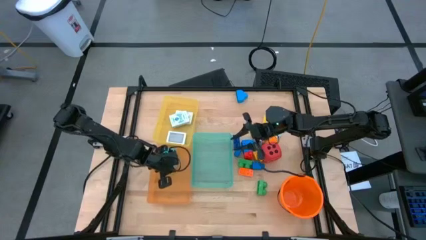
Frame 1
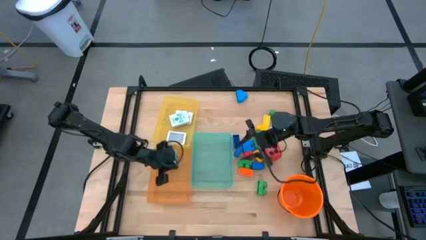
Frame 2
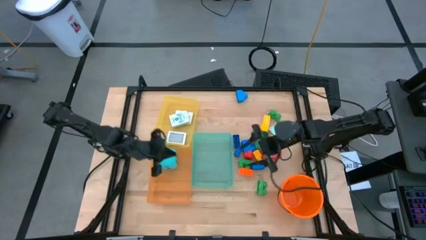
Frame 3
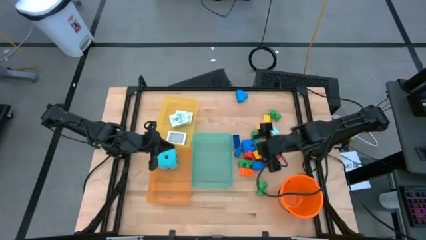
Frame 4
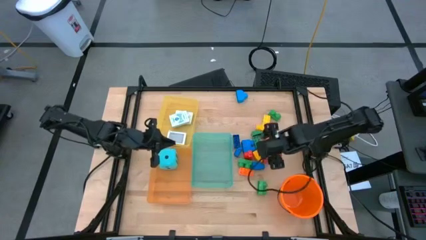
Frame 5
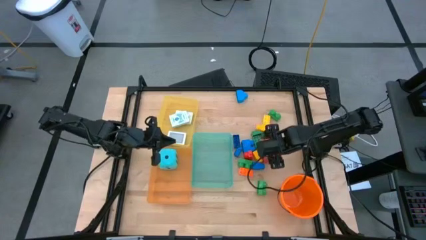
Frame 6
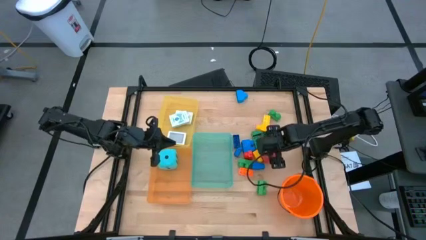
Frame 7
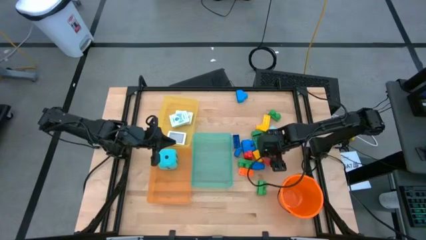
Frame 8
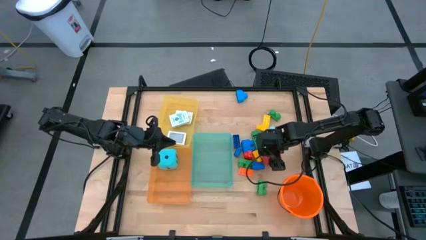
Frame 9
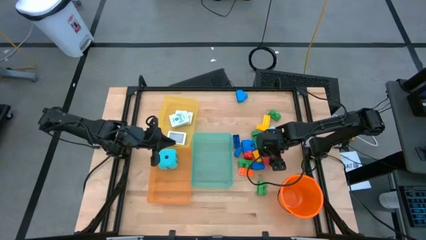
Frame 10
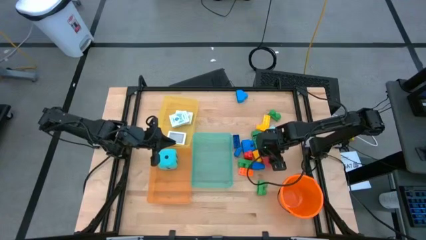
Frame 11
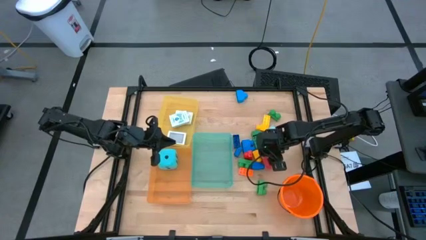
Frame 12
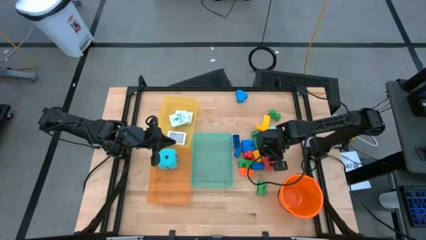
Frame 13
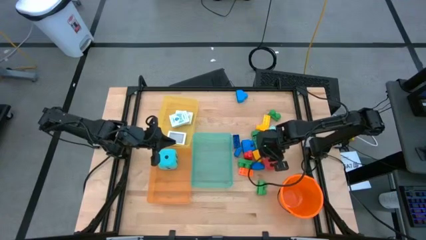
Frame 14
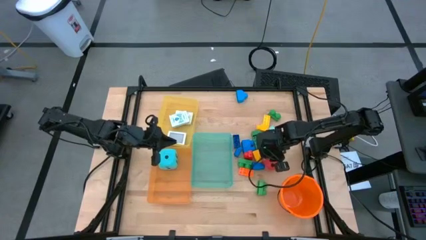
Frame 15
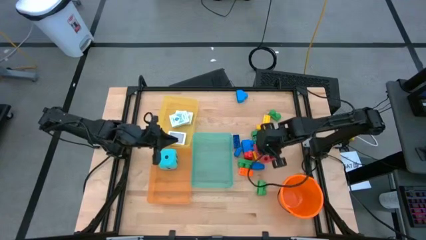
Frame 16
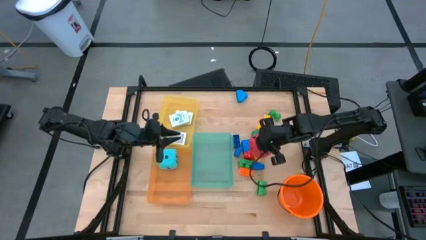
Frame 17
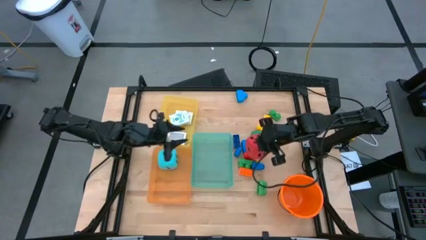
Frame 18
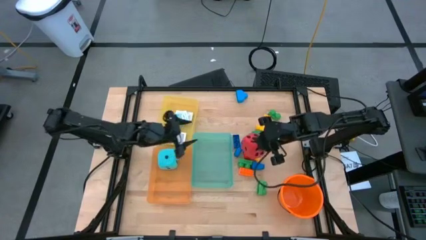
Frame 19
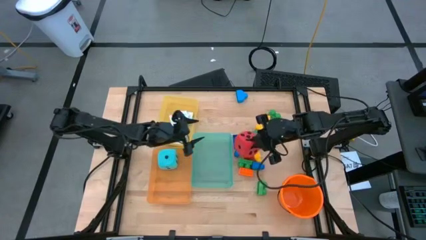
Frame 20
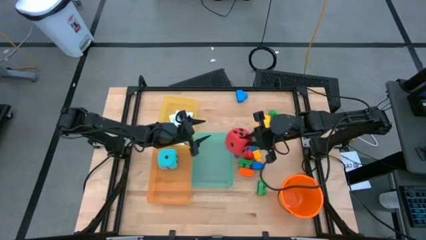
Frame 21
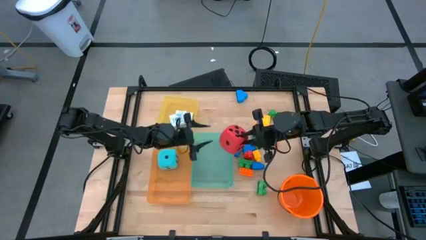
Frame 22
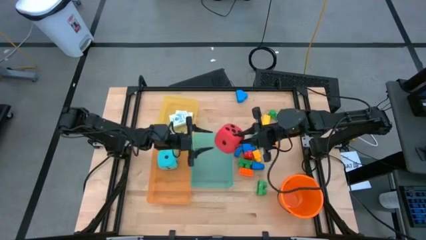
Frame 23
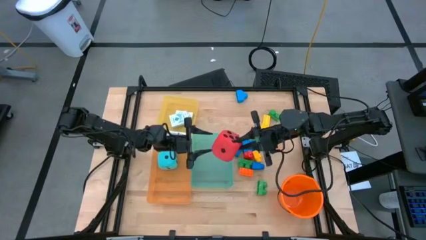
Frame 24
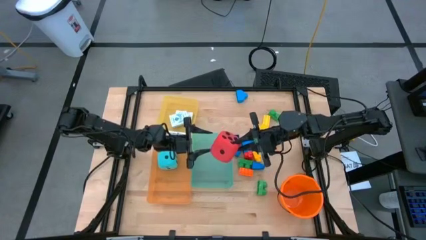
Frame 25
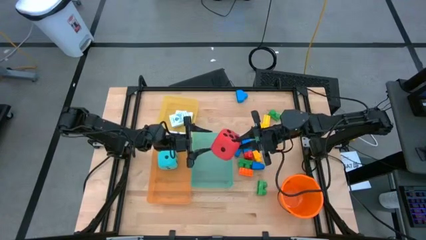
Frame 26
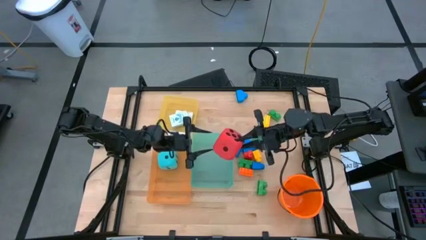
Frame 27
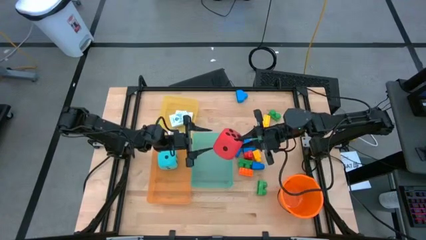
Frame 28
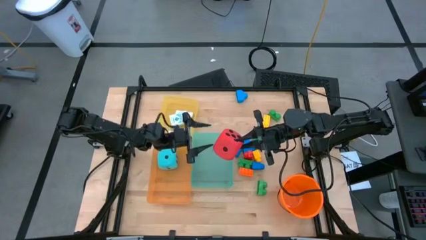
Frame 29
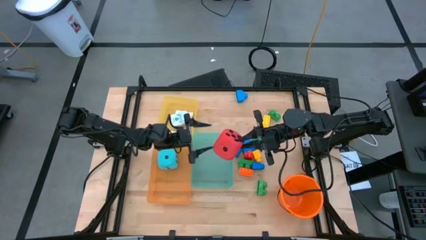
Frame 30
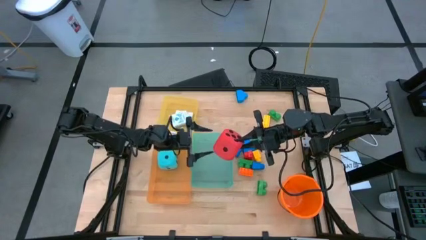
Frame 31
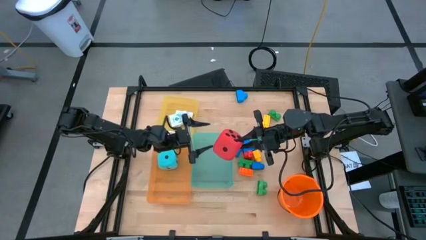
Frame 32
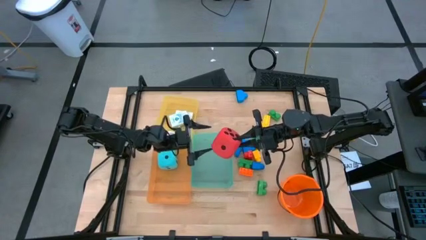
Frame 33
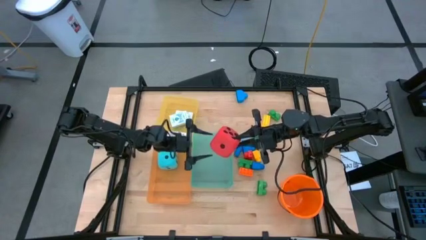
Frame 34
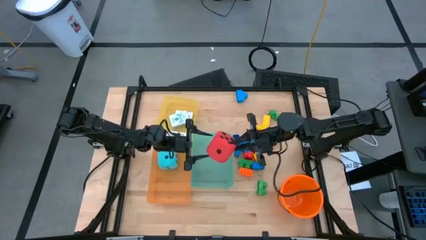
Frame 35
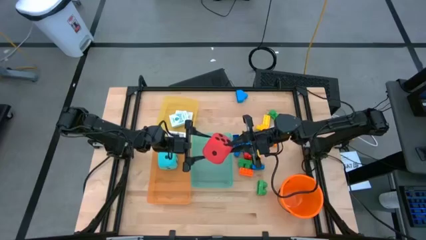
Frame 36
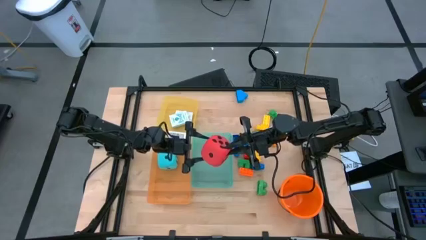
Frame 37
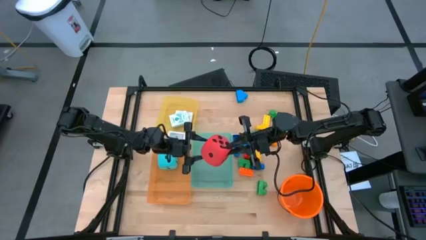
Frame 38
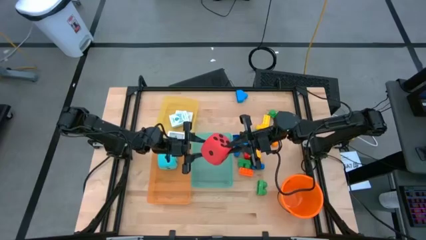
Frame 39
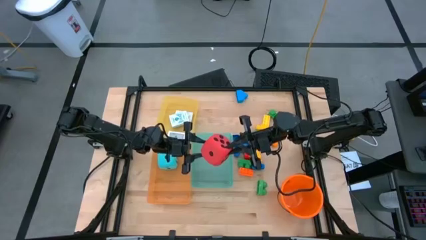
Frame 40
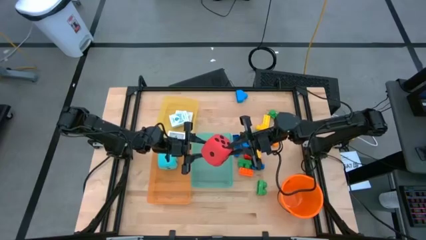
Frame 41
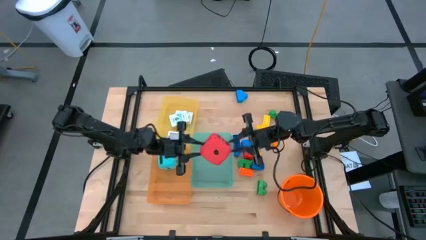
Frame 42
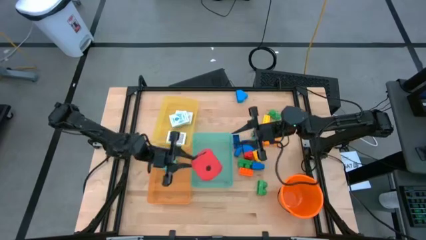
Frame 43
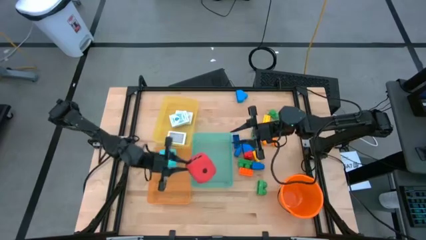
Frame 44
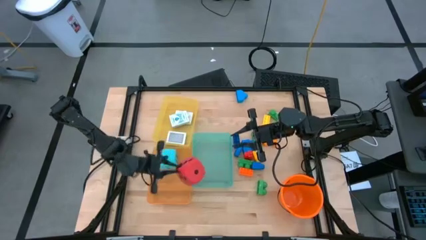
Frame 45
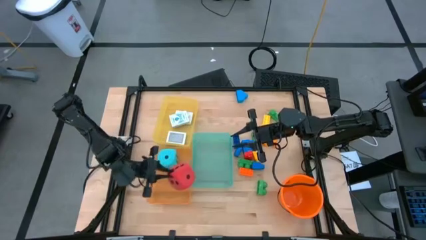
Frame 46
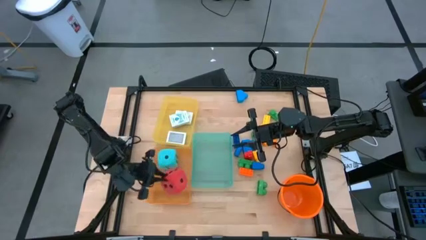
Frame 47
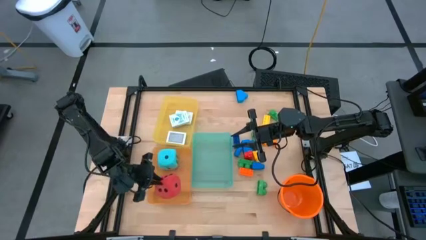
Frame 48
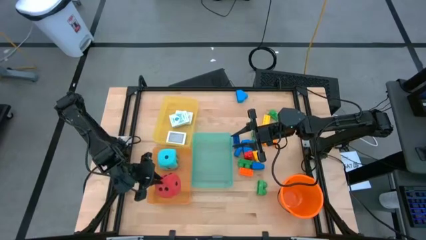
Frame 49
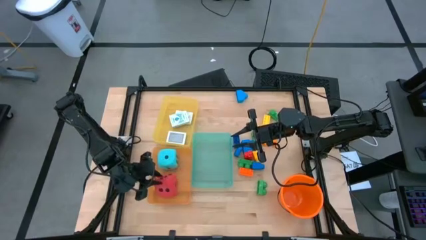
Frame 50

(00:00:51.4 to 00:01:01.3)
Task: Pick & Place Toys
Put the red dice into the orange bin

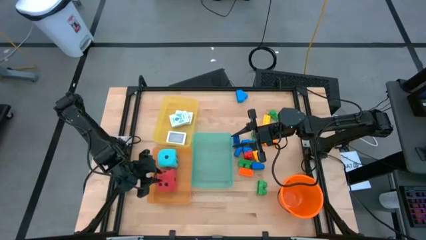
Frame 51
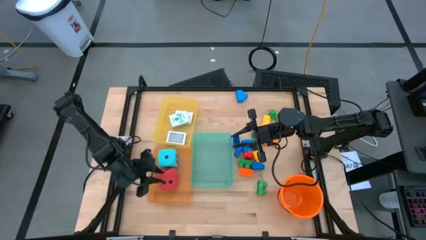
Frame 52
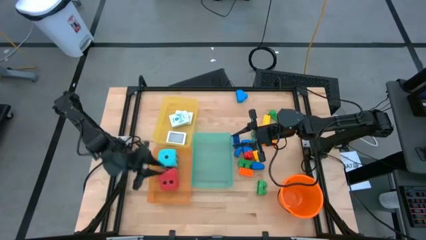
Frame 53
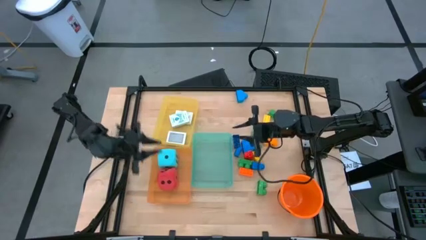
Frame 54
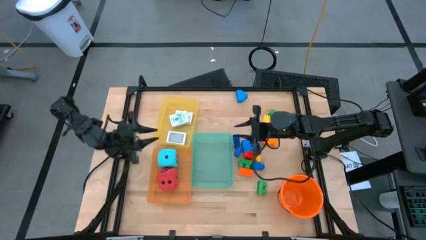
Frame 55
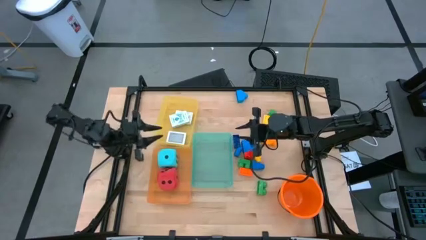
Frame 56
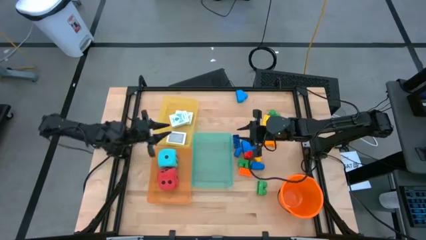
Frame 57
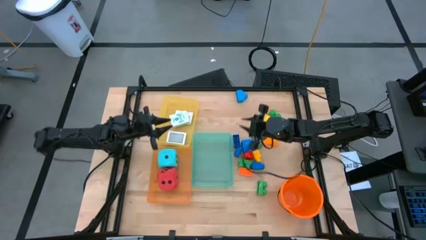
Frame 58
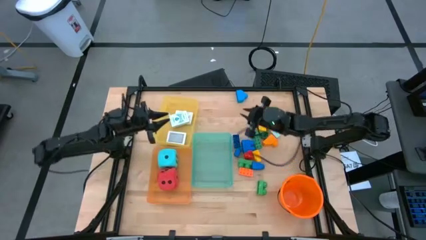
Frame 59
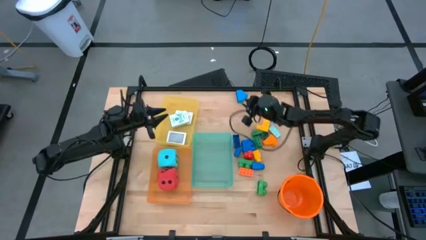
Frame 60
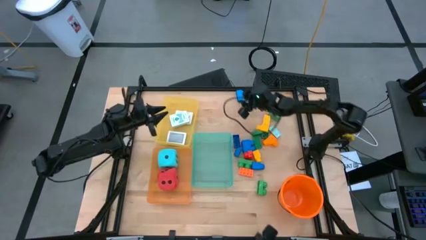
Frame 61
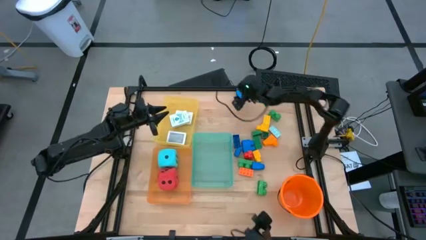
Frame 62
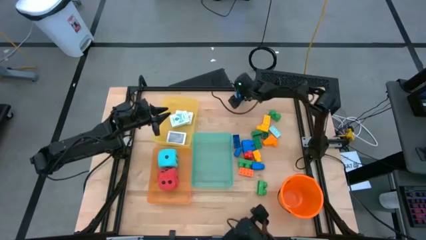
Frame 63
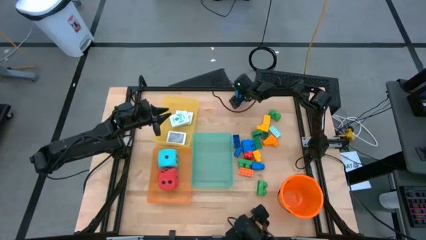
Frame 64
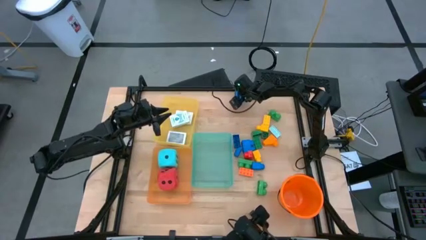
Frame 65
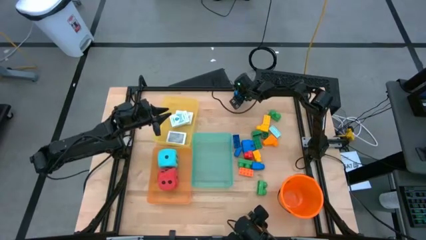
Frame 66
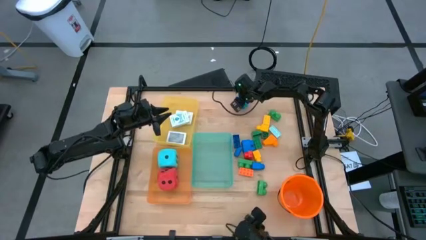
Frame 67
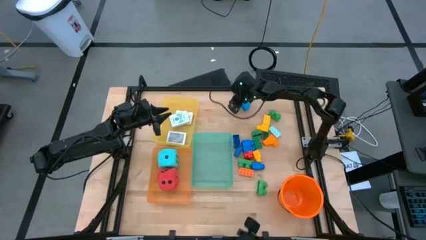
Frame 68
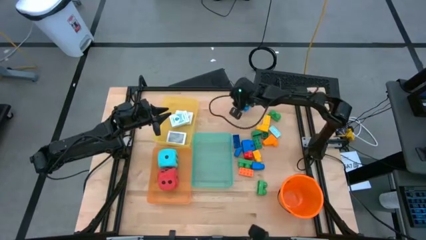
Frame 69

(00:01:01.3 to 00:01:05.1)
Put the blue game piece into the green bin

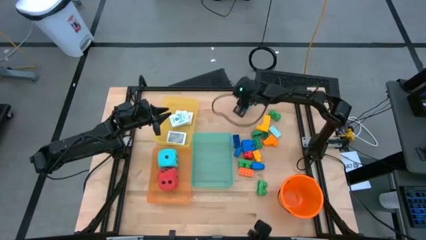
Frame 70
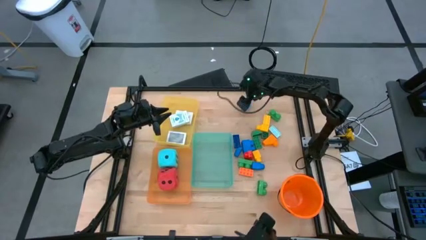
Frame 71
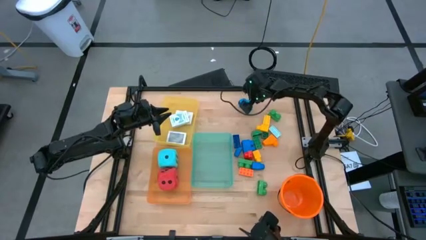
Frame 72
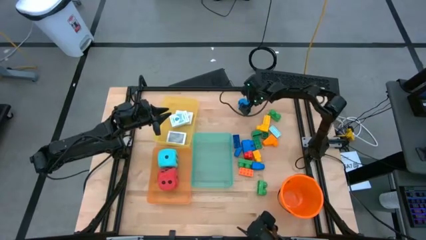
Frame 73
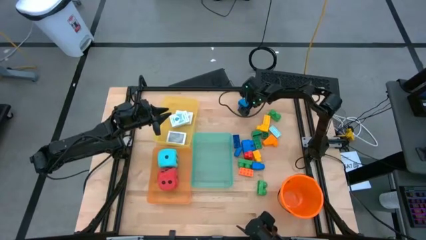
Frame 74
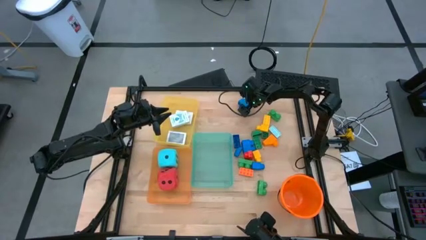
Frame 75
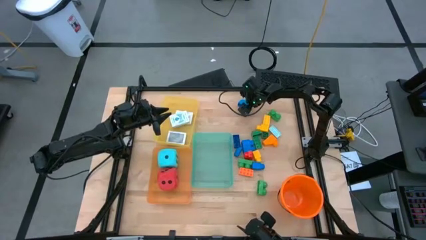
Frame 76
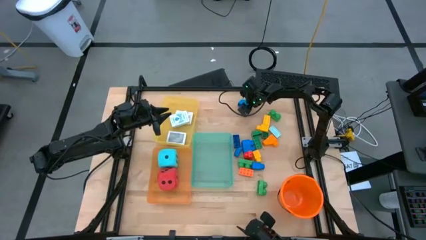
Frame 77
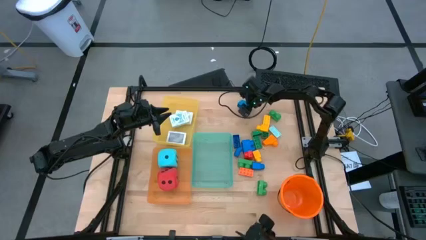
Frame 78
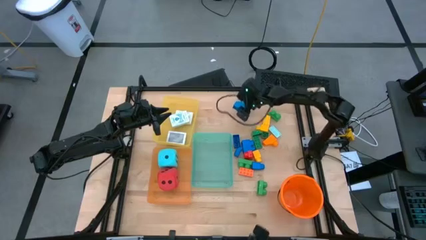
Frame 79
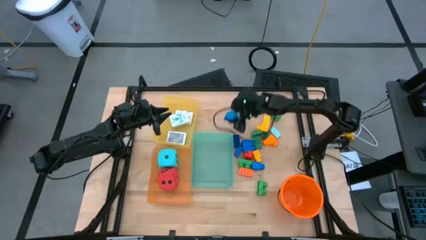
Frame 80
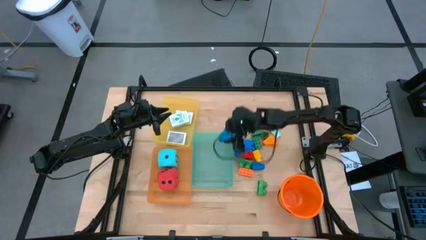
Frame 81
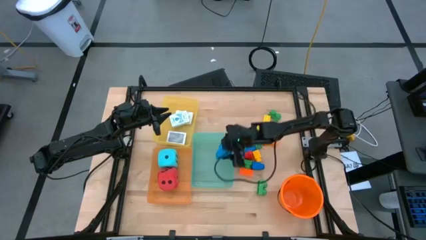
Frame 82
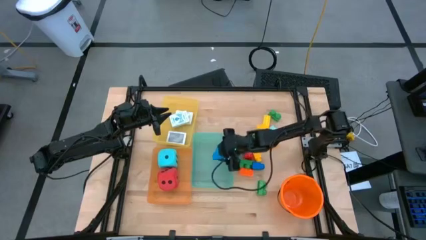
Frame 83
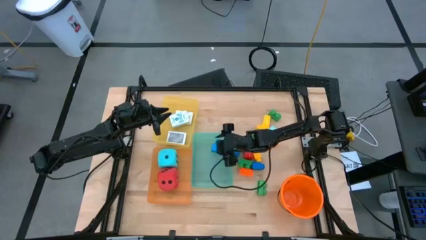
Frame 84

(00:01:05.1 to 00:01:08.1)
Put the blue game piece into the green bin
